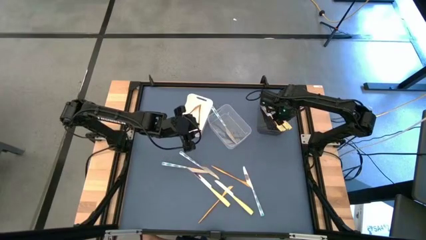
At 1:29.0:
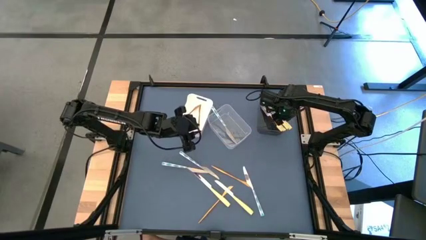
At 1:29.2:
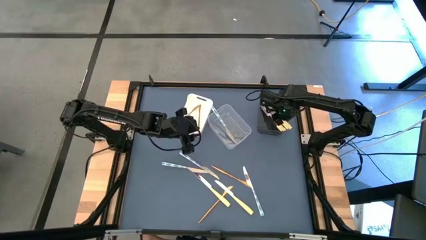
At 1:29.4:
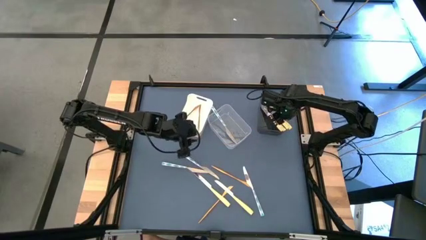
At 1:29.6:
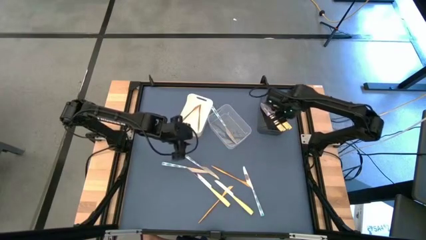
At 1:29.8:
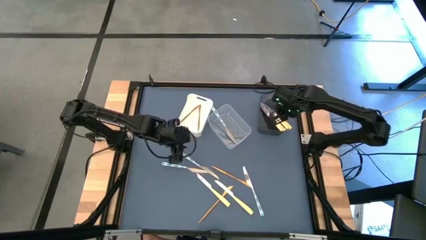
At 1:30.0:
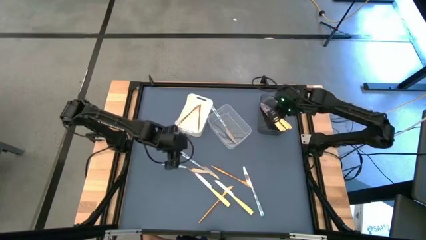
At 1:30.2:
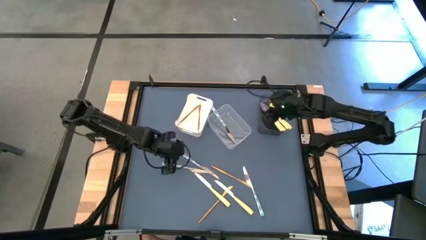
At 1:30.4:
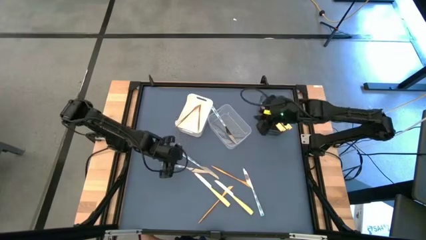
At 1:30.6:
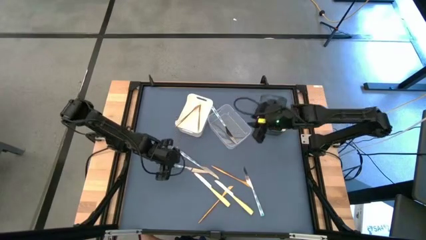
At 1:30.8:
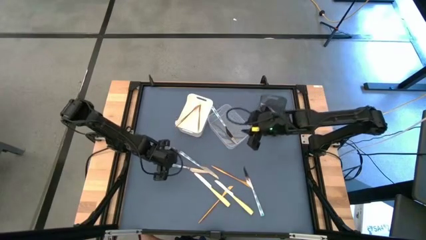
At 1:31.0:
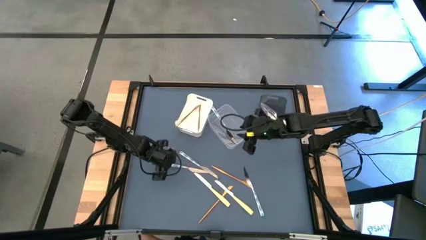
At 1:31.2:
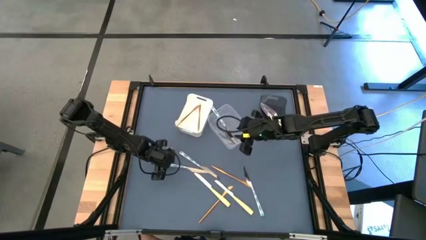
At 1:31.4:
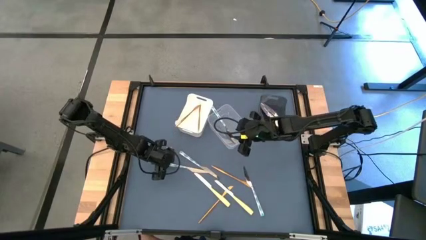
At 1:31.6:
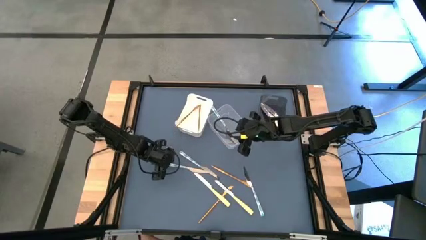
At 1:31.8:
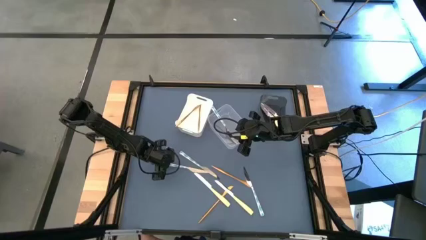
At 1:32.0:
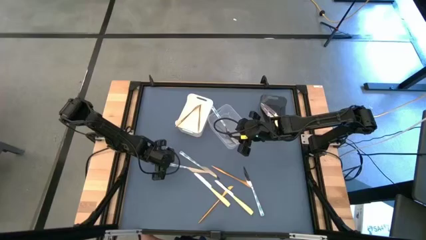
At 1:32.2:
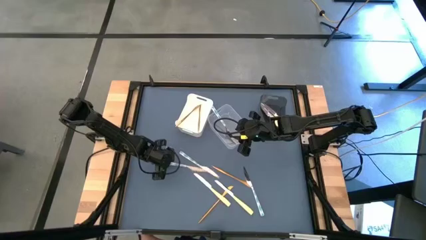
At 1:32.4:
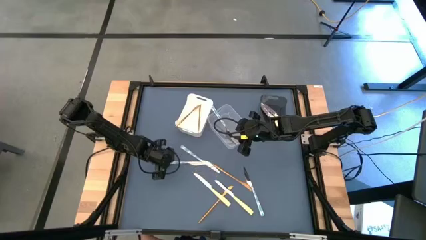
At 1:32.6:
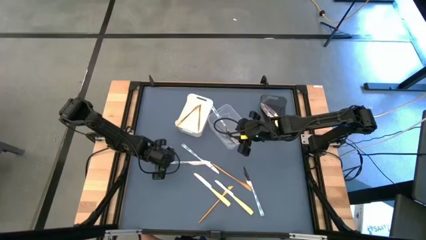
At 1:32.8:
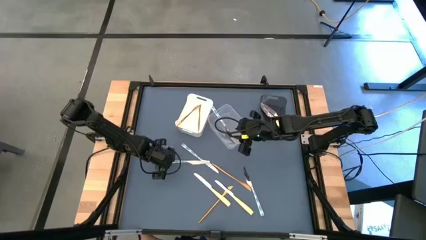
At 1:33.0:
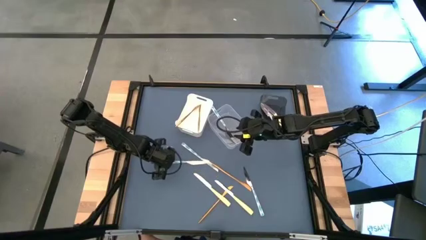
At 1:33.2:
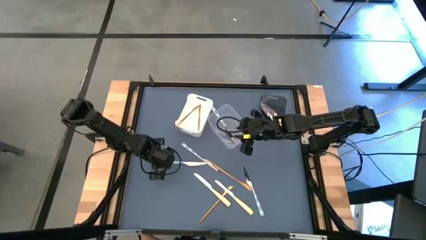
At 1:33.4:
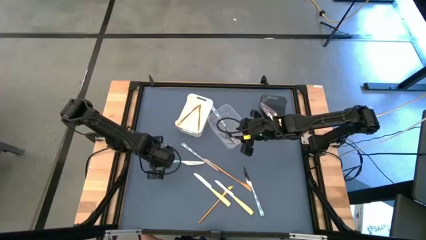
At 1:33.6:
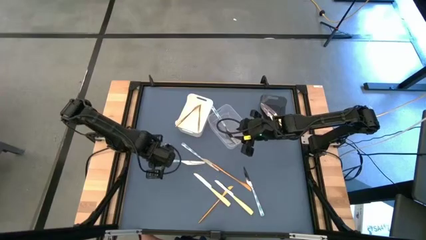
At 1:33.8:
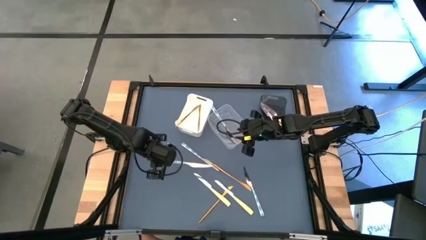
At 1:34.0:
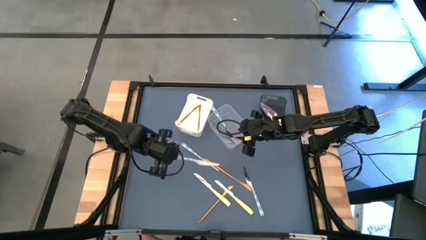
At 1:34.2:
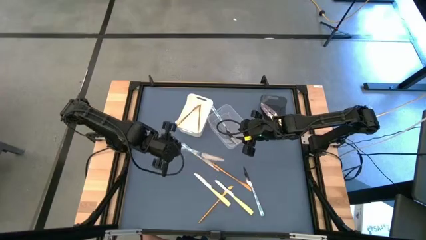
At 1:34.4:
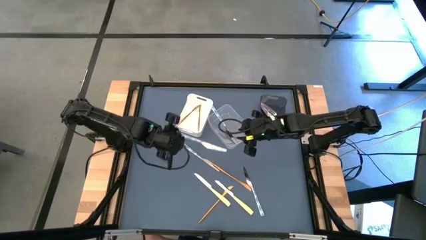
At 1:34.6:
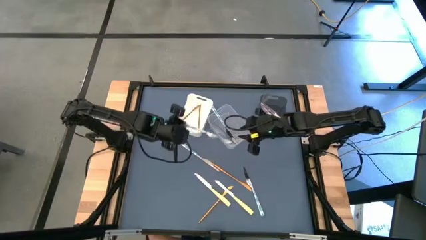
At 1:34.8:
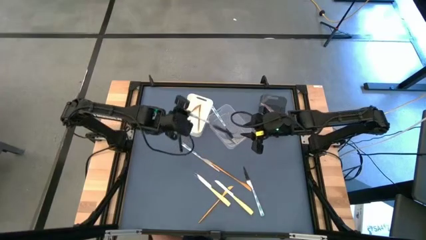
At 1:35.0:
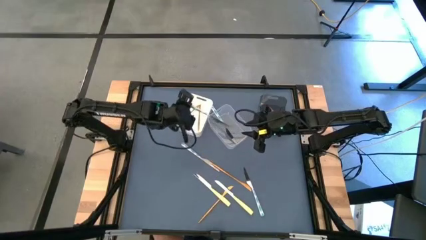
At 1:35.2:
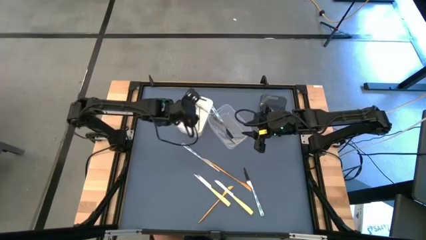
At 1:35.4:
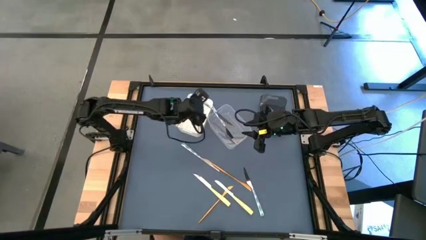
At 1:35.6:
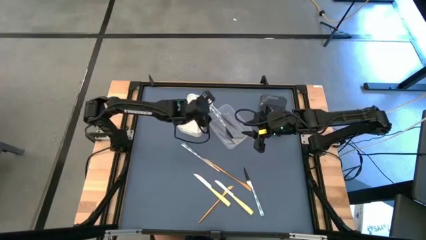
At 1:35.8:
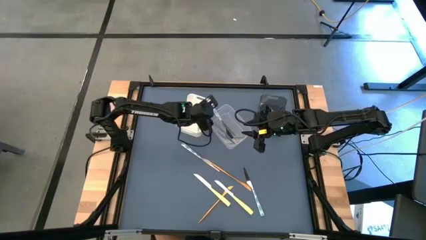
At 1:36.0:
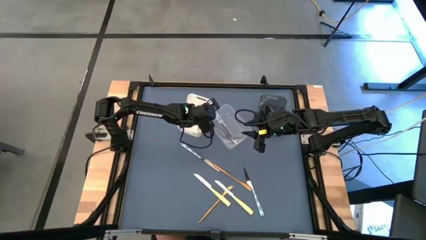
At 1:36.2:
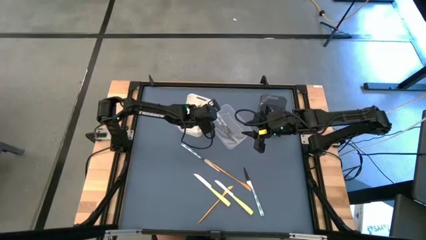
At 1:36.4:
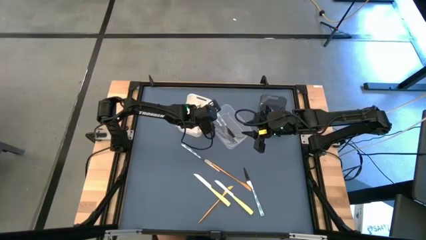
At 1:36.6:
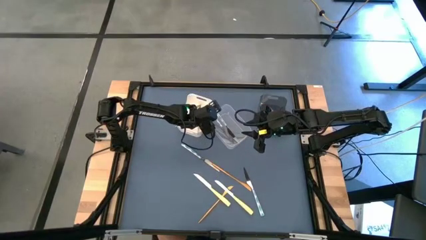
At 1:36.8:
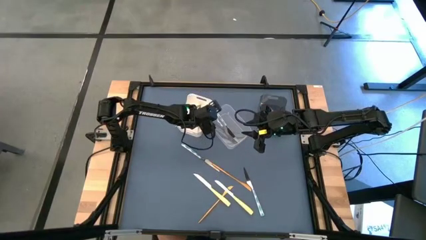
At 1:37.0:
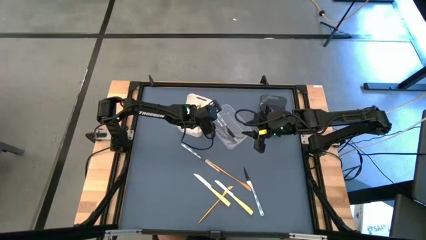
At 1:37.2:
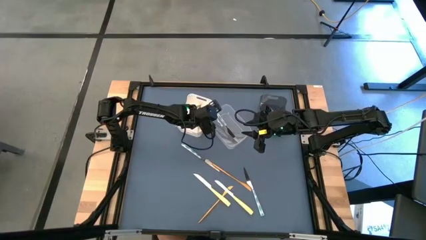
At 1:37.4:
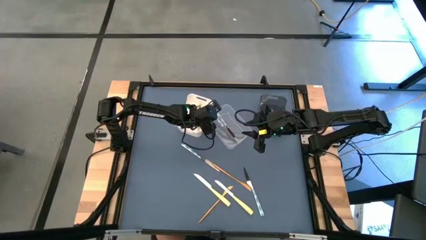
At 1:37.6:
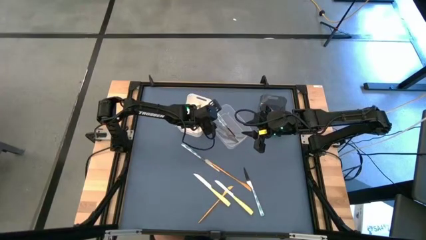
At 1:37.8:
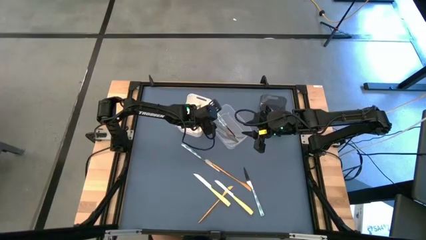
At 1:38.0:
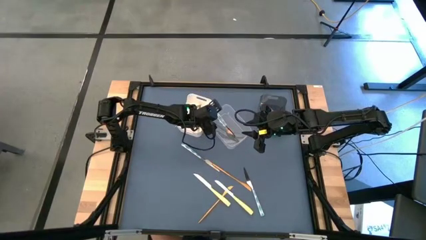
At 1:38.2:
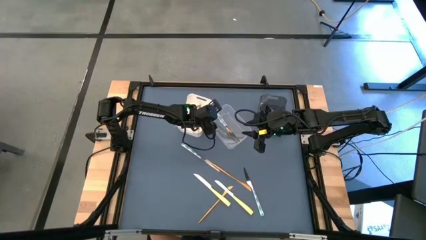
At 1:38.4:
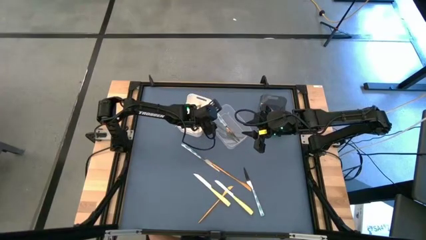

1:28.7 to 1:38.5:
Task: Sort silverware by color (type)
Put the green knife into the transparent bin

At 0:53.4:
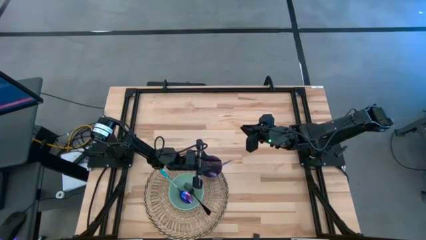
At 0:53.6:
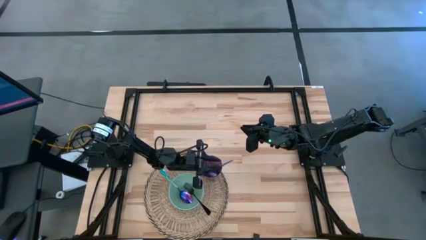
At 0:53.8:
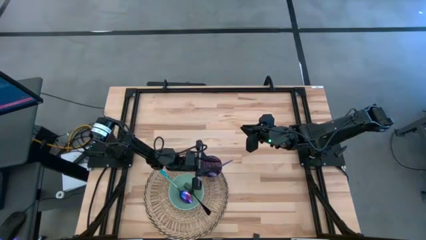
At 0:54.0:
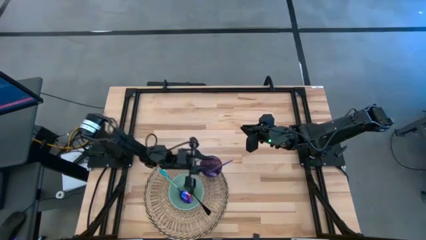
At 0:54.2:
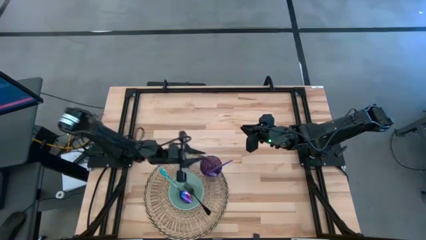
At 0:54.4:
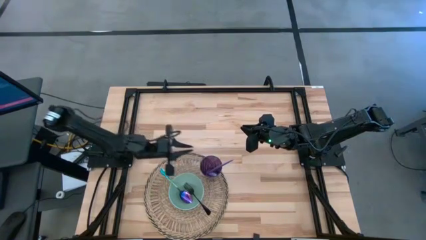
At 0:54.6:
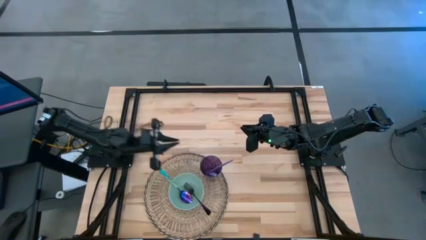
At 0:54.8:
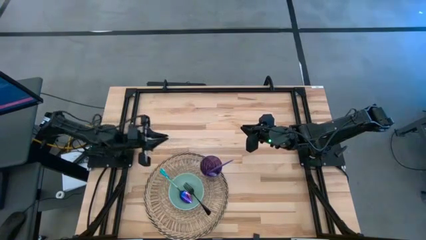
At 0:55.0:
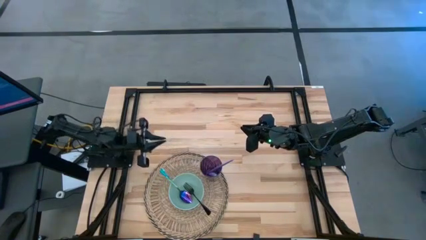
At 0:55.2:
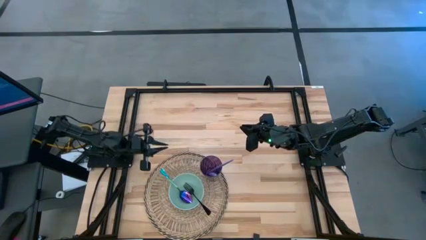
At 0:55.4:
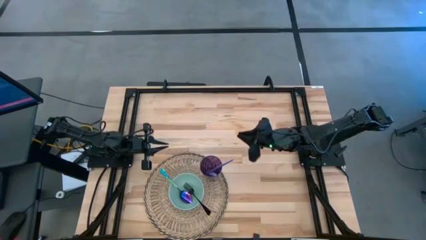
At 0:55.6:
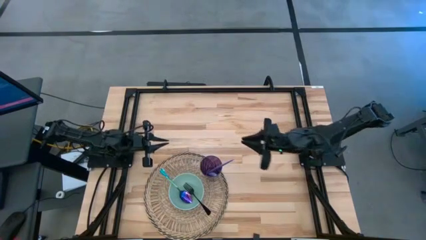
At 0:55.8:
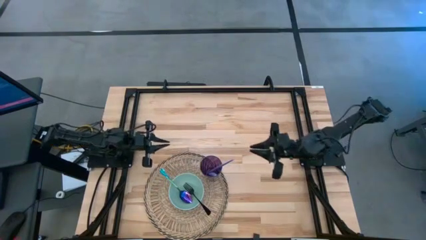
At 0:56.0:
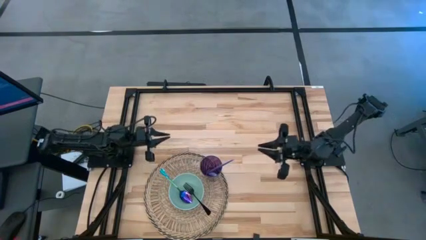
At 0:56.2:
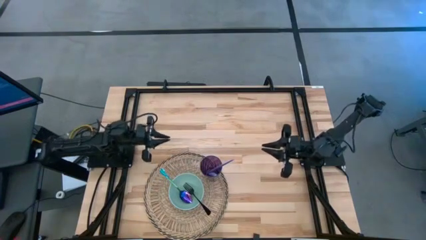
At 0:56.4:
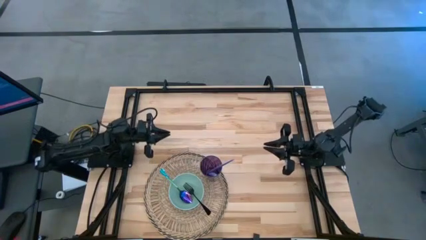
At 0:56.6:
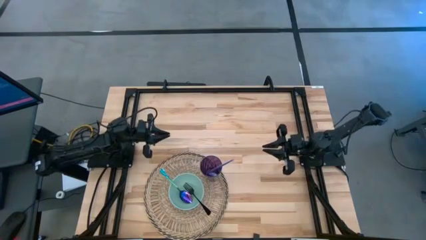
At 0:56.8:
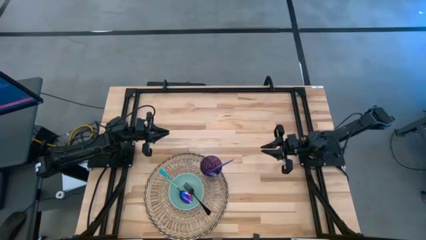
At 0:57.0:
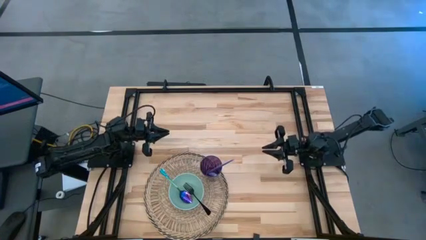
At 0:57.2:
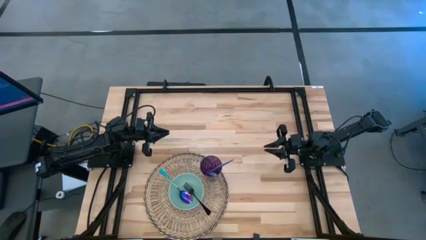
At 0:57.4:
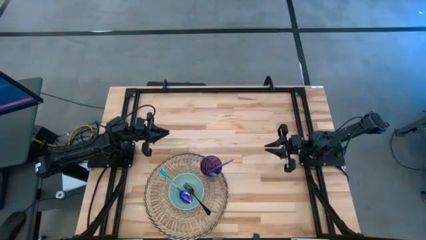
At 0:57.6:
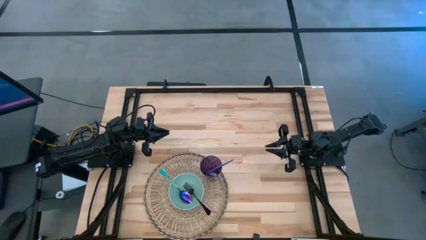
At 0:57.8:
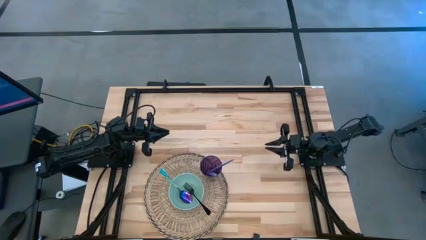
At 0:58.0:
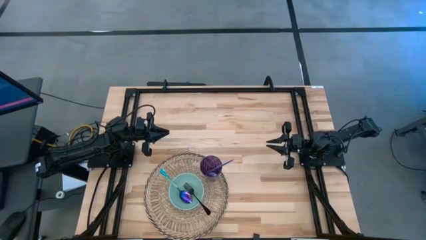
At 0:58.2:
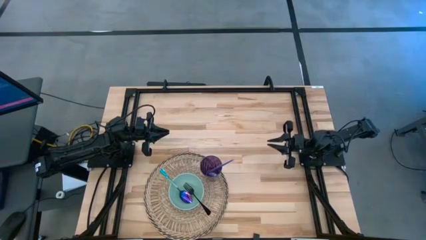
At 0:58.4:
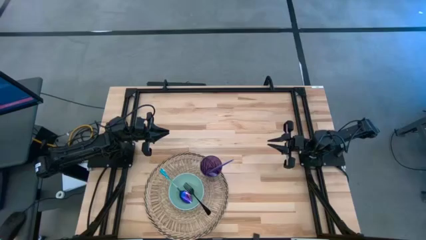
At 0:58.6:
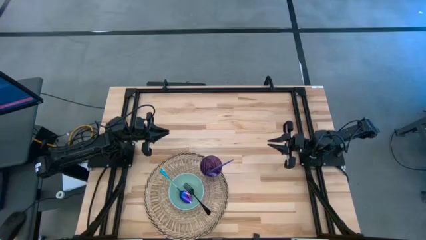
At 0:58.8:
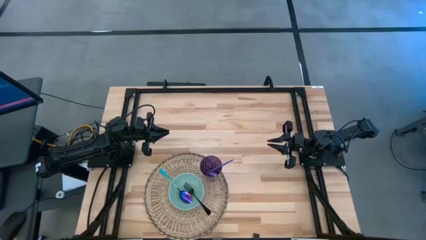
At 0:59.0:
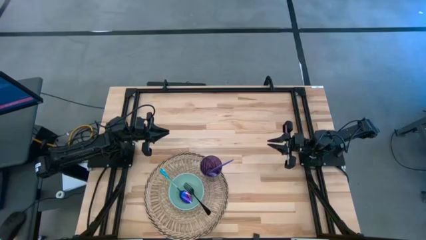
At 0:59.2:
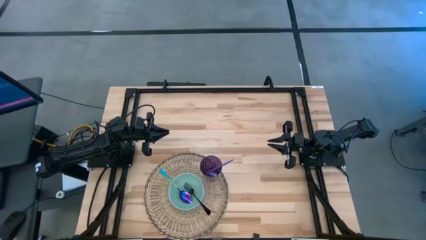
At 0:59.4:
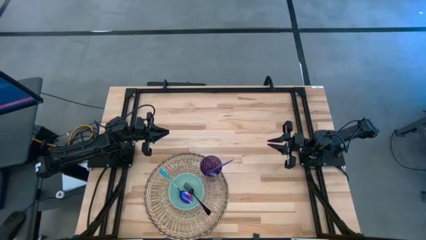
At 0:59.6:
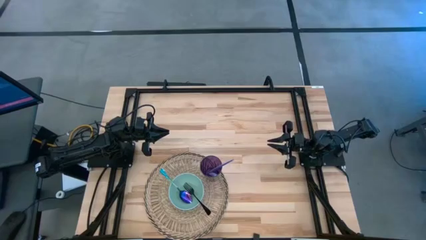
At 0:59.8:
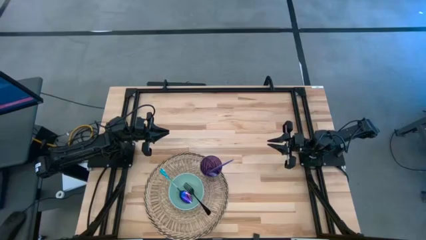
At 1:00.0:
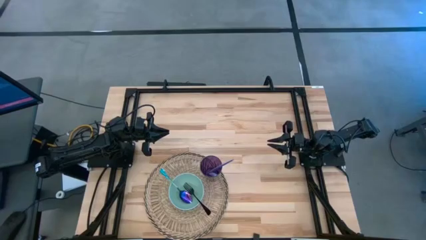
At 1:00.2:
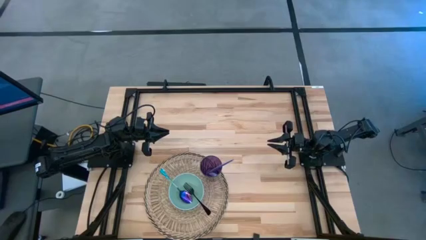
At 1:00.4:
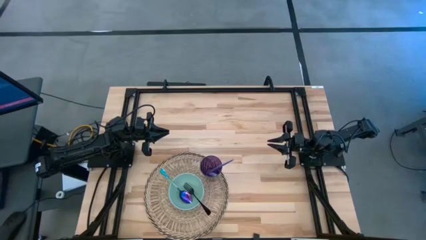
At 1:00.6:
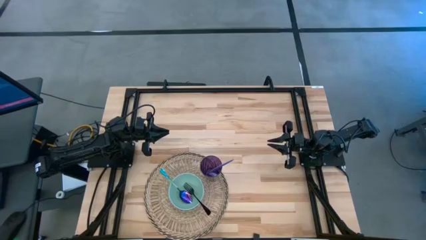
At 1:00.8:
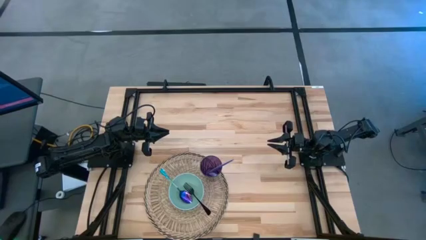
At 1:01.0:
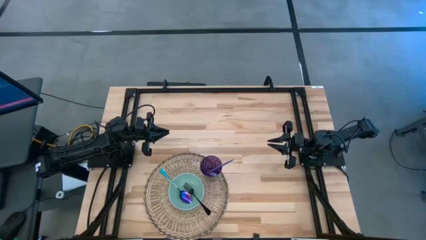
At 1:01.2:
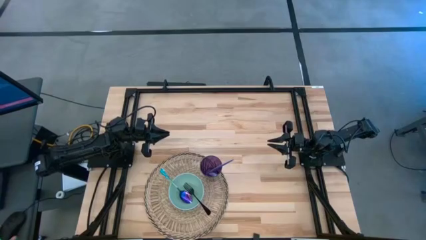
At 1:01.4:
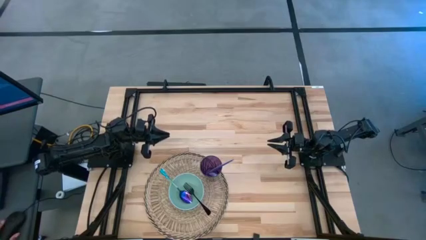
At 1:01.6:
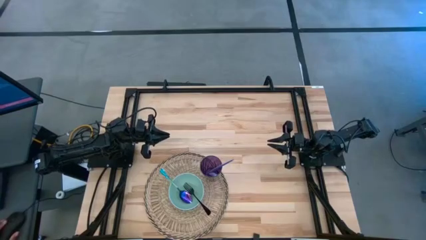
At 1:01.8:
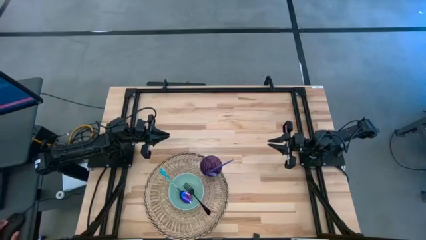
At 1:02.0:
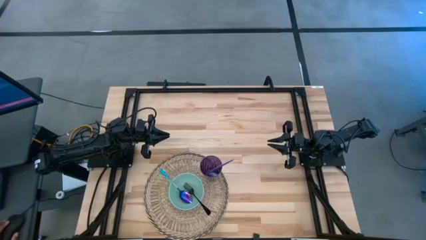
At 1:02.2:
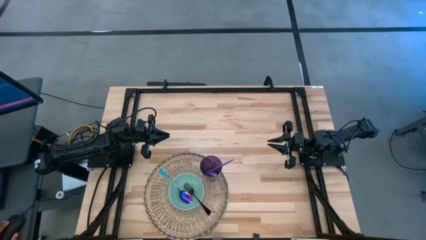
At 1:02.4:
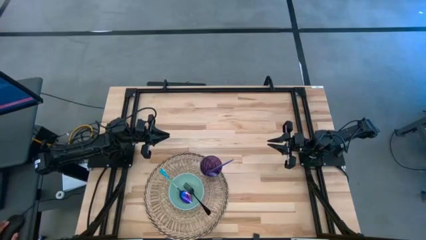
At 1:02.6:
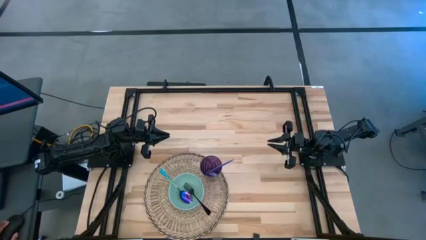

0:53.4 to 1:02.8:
Task: Pick & Place Utensil
Return to Home Position
